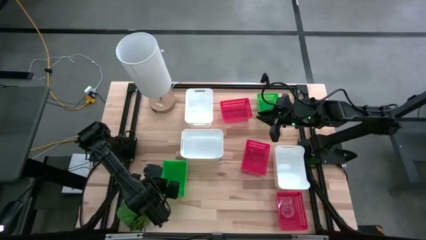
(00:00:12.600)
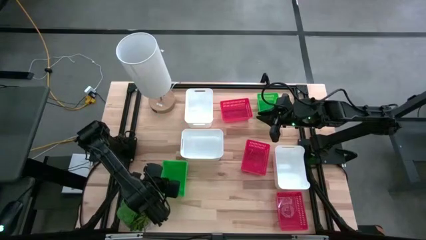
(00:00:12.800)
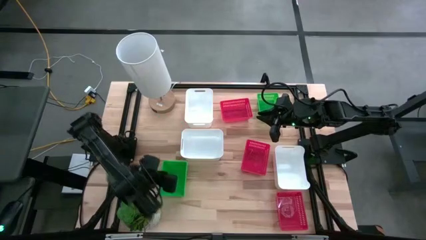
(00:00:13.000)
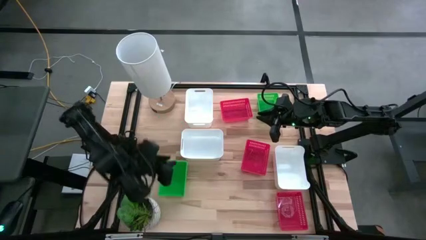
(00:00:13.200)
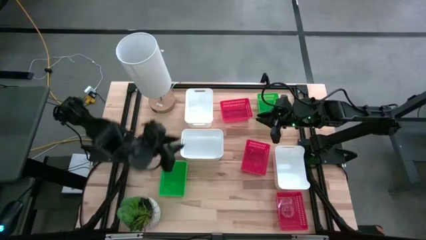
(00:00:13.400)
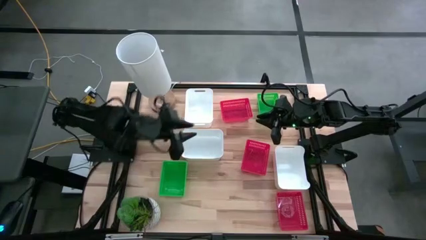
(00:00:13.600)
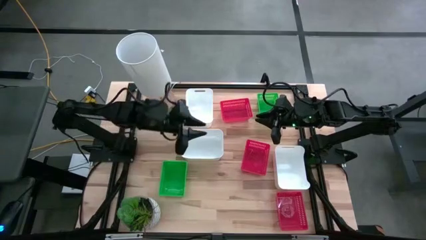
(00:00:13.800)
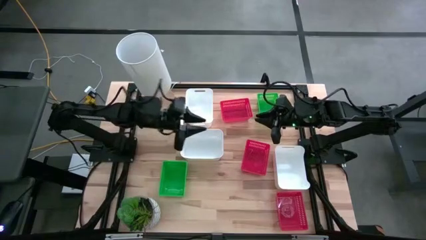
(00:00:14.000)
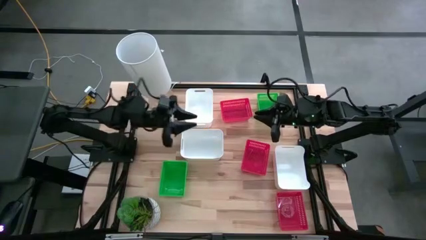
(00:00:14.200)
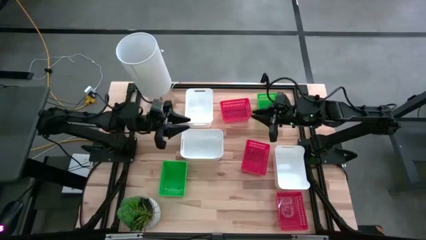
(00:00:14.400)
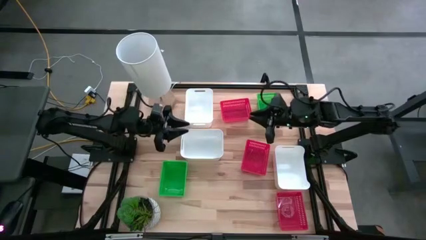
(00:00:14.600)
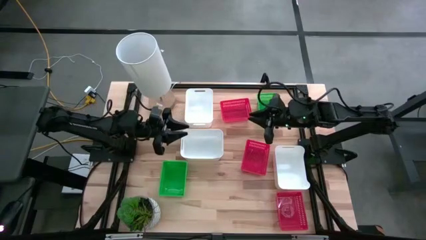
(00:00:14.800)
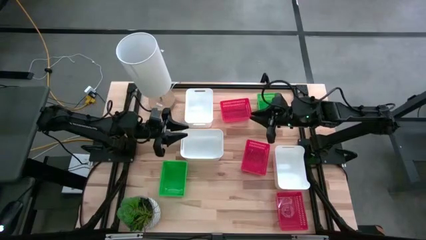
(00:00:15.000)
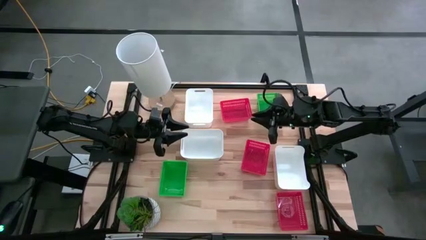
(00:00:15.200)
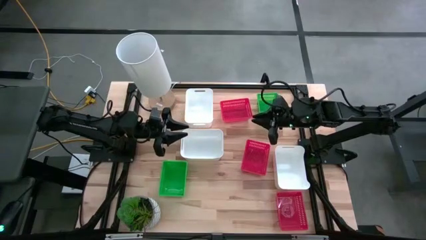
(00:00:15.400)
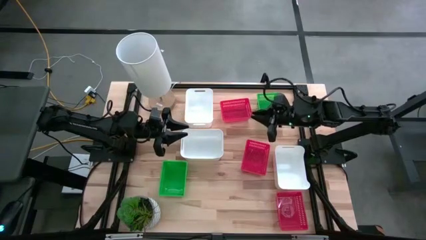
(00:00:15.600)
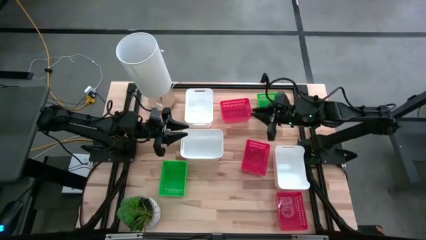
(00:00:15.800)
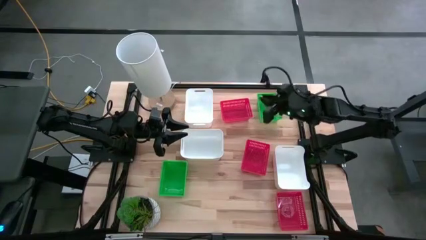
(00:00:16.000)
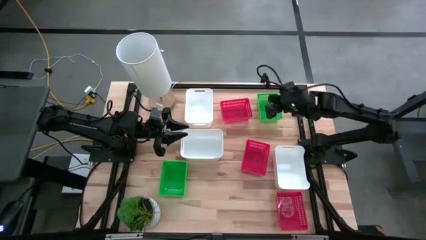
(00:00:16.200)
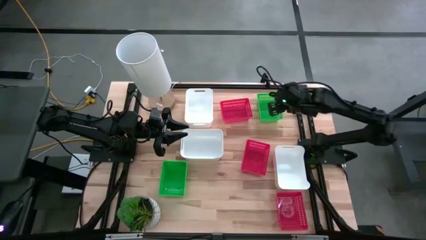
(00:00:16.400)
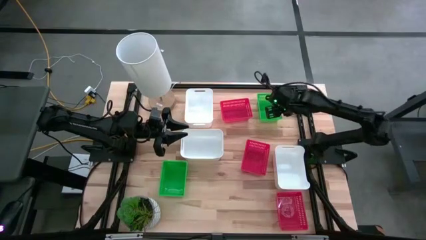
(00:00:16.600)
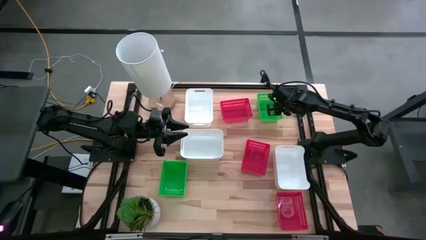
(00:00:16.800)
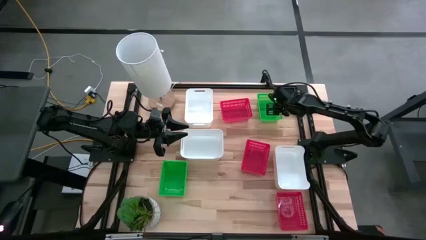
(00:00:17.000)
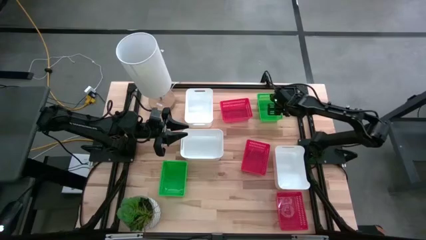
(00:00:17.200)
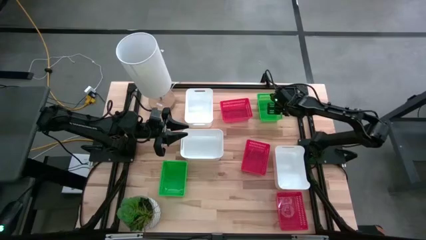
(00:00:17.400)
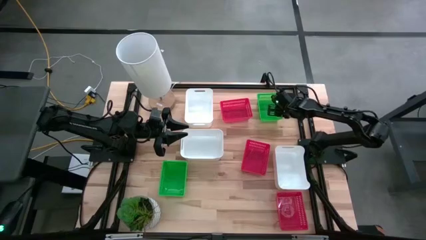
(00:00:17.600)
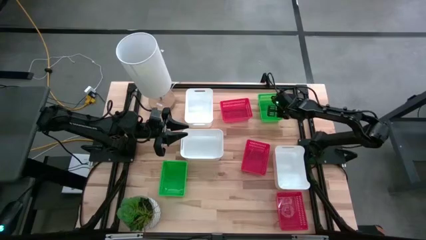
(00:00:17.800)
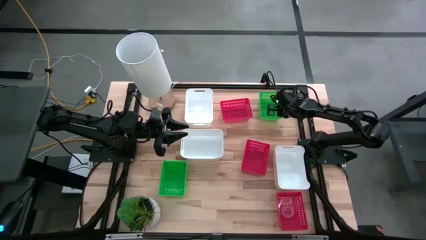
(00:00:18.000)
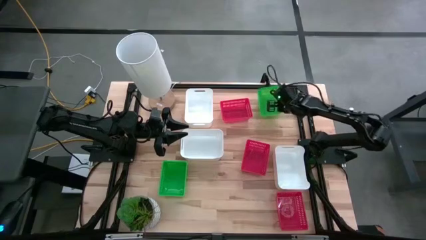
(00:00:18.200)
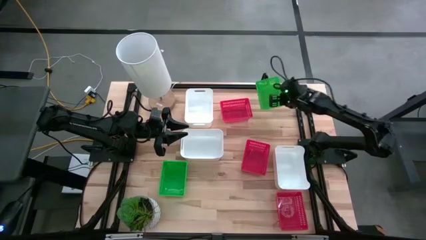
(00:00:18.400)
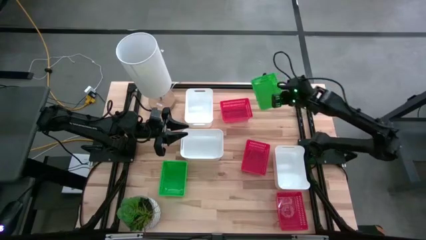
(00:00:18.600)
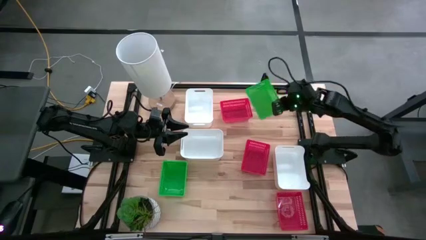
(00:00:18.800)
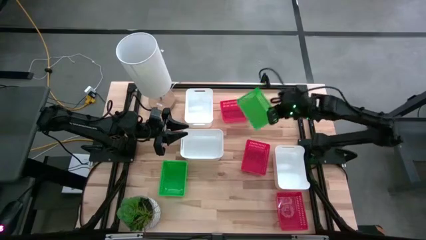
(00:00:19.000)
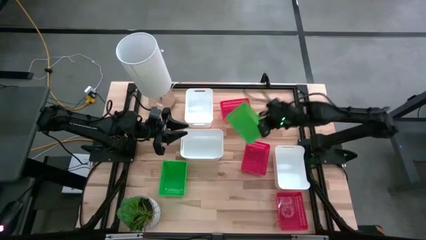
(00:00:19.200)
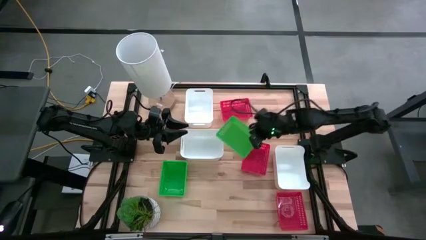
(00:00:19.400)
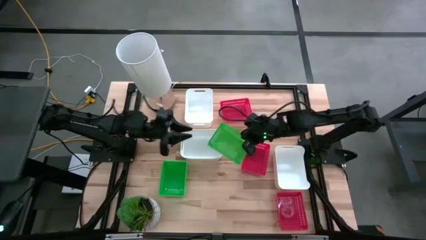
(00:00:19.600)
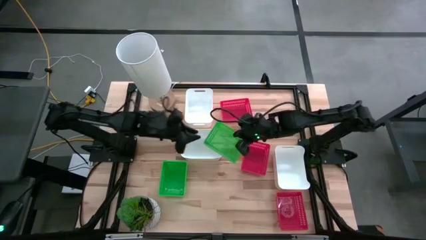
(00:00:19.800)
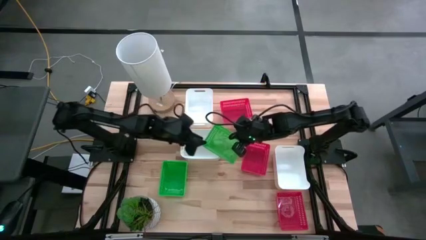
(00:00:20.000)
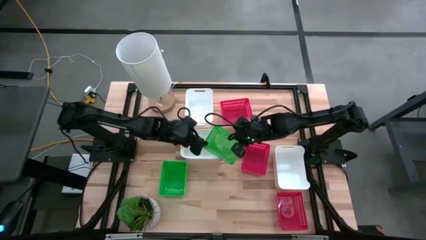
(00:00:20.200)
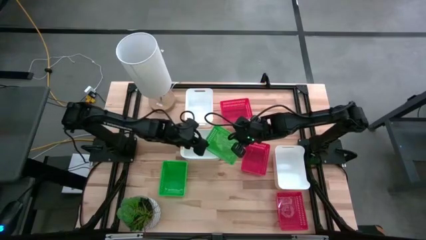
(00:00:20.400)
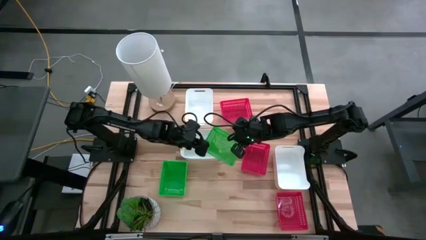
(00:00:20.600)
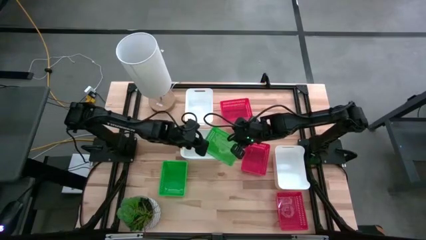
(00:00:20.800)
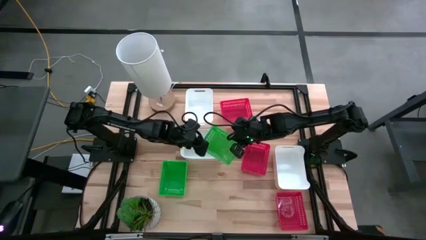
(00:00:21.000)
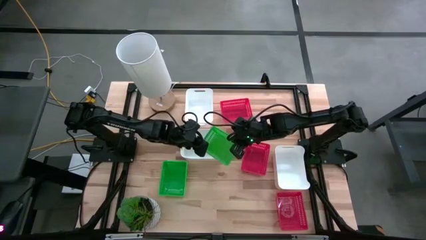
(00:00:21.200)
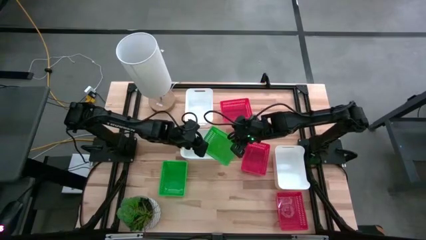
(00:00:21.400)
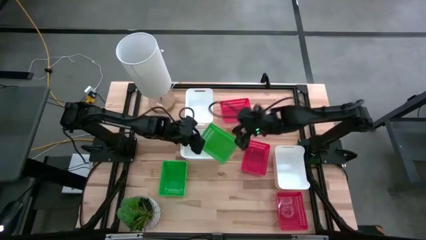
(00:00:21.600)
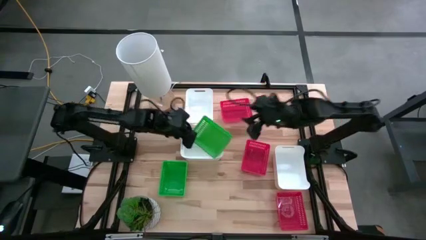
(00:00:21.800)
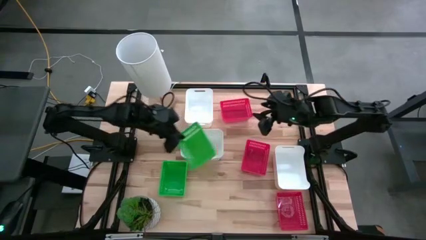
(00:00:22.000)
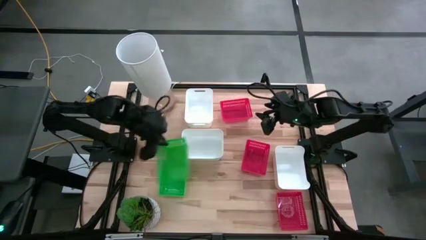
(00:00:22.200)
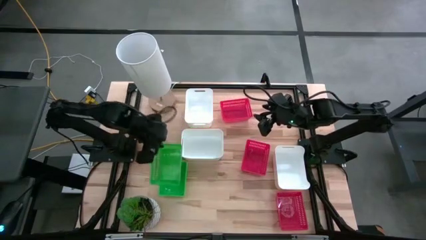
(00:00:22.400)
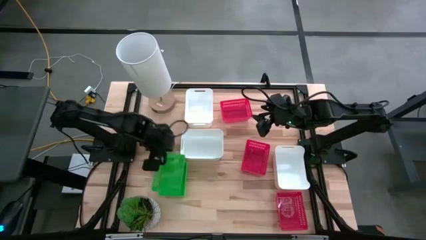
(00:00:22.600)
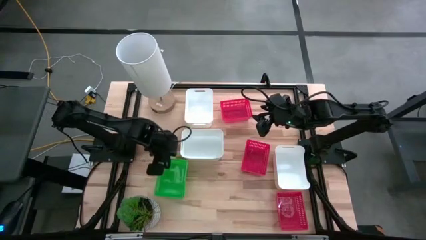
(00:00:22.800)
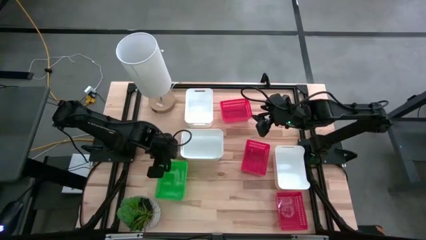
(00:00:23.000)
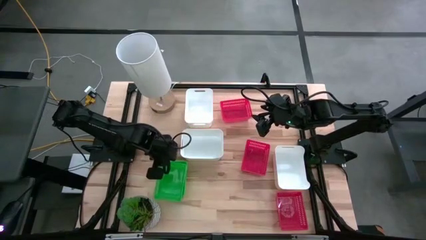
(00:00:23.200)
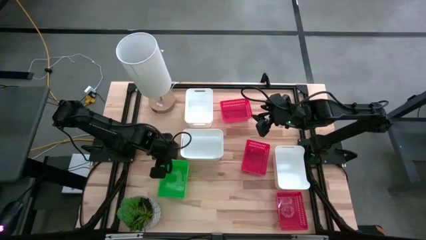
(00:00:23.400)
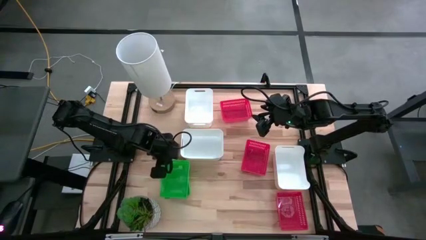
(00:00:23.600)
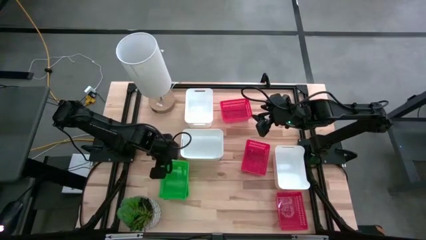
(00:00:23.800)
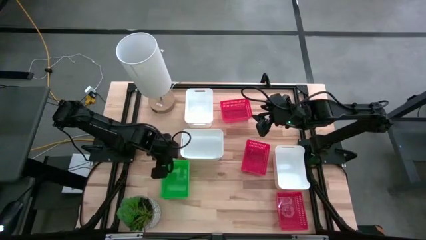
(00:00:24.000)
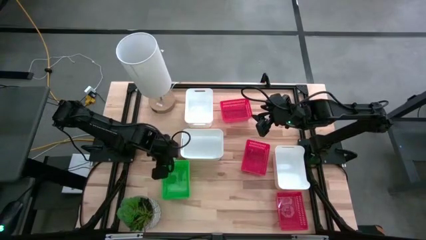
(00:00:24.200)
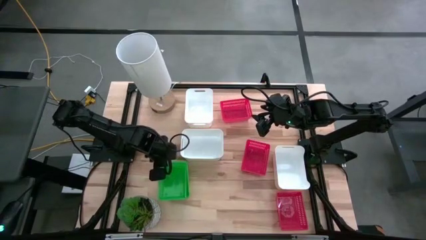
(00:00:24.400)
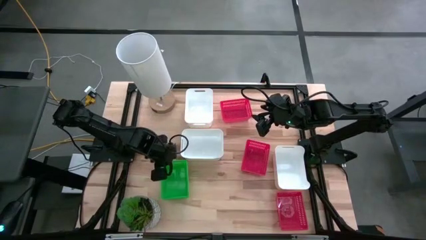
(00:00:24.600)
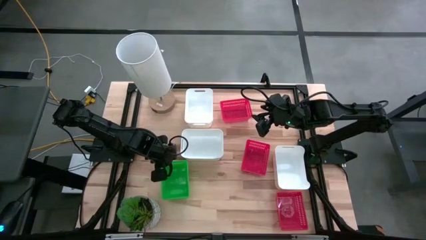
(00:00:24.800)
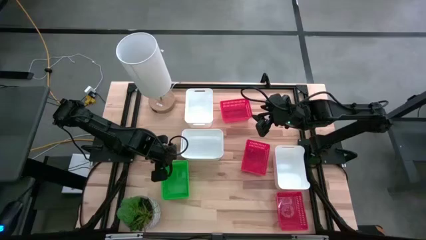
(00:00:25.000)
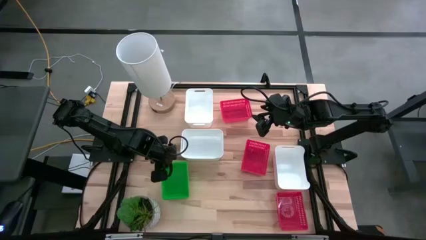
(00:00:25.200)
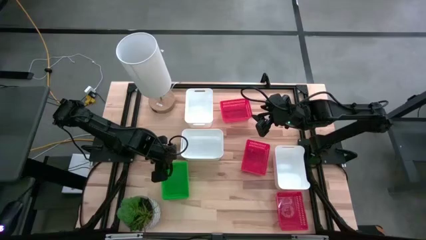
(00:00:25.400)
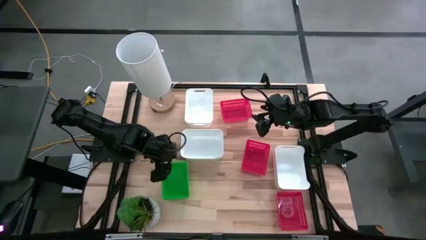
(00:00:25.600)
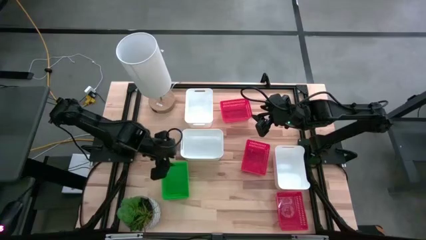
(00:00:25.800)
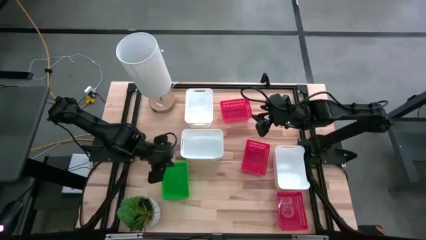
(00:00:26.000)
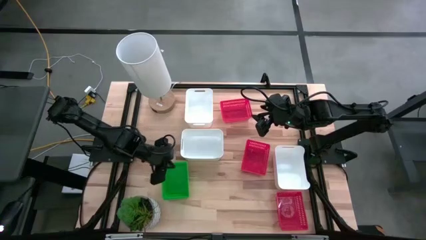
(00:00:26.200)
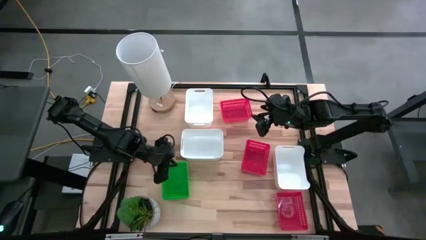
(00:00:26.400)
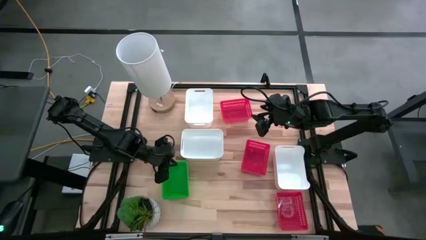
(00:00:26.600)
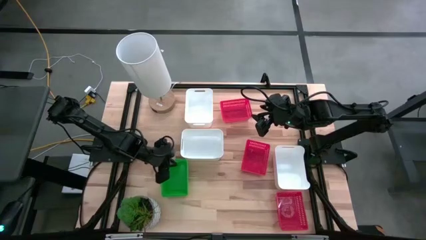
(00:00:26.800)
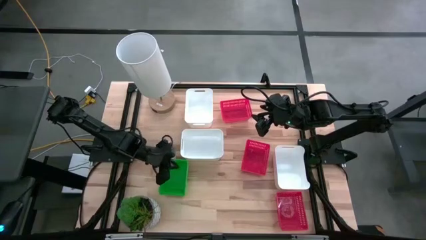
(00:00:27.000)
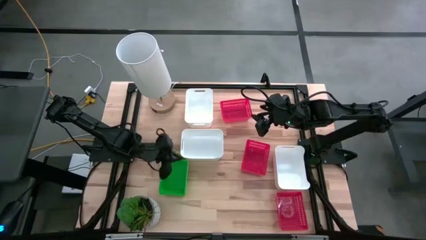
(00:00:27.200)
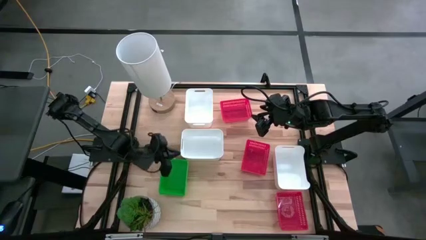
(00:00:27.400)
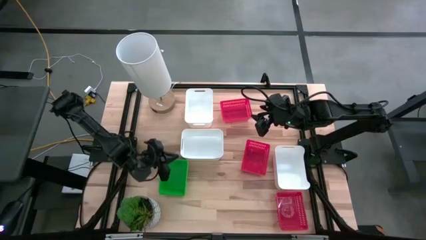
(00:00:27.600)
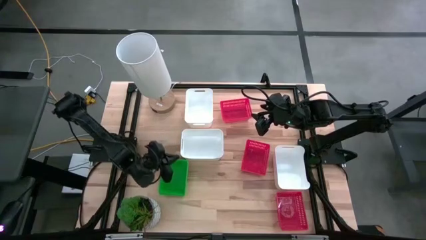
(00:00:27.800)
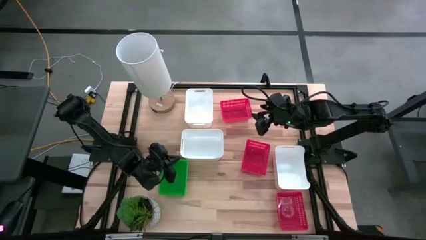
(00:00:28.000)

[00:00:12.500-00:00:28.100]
Stack the top green bin on the bottom green bins
